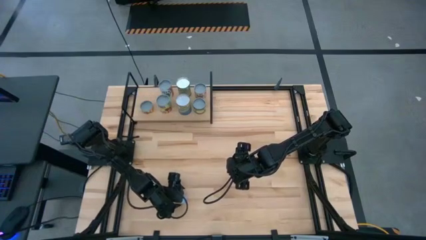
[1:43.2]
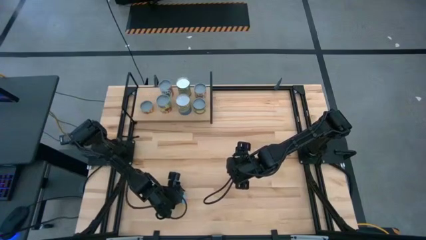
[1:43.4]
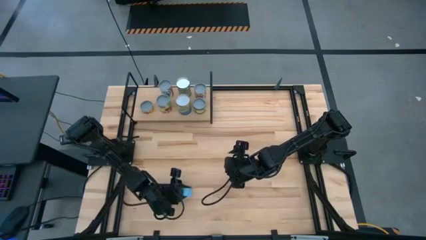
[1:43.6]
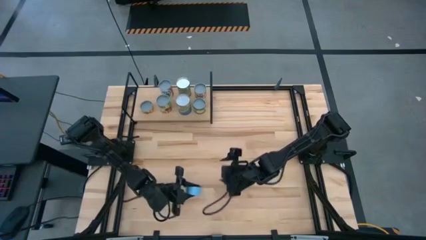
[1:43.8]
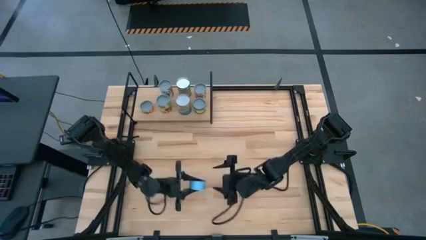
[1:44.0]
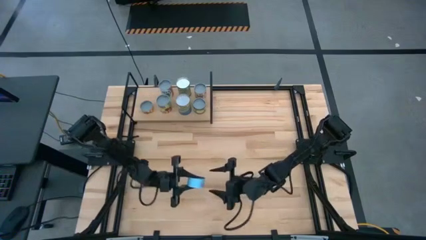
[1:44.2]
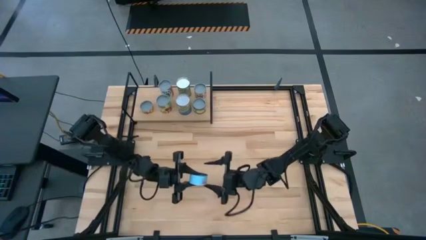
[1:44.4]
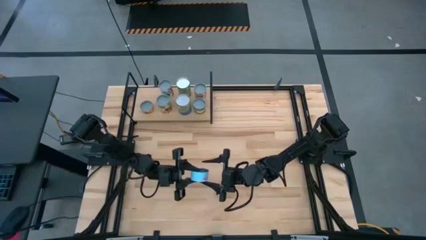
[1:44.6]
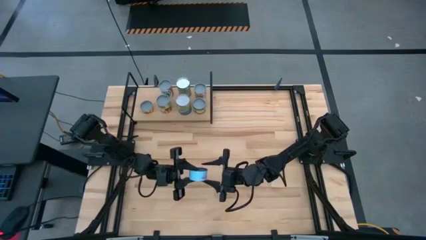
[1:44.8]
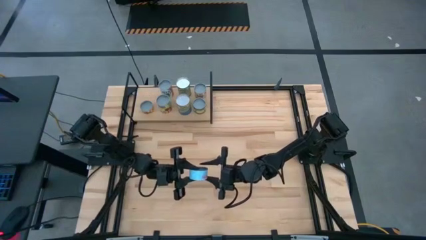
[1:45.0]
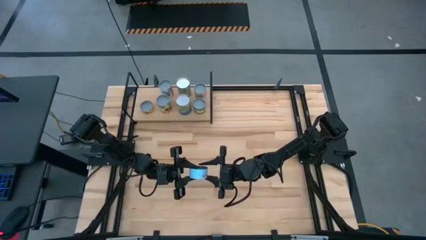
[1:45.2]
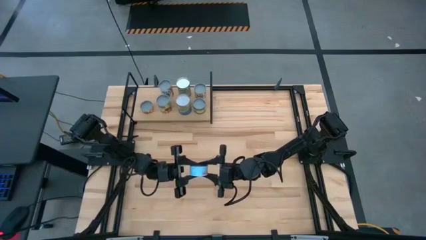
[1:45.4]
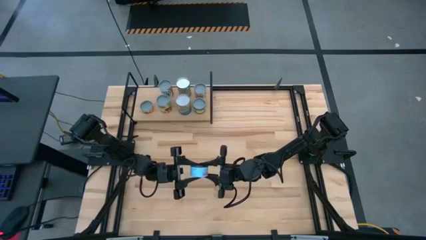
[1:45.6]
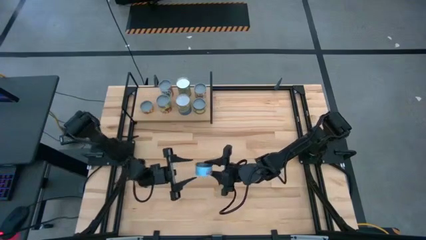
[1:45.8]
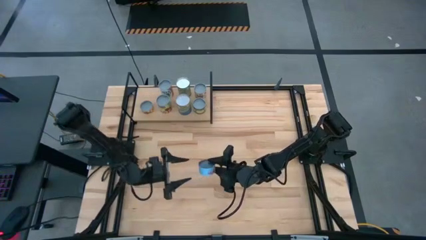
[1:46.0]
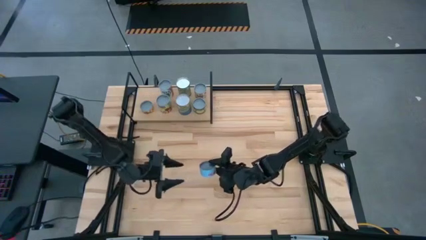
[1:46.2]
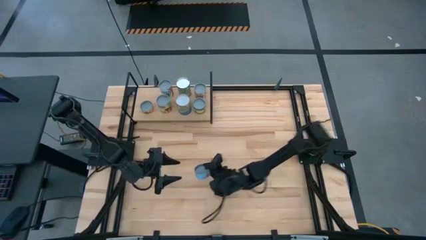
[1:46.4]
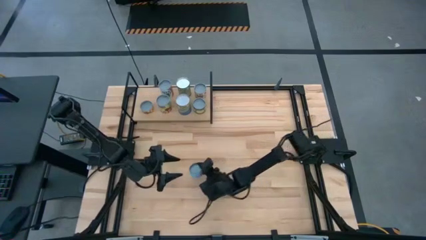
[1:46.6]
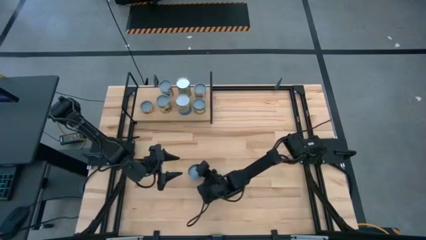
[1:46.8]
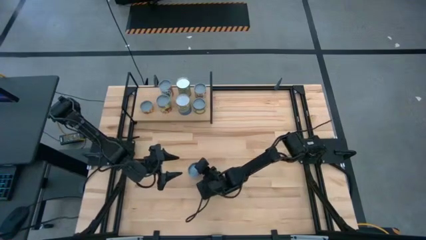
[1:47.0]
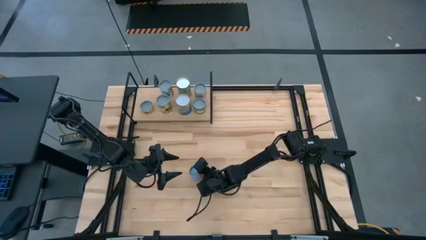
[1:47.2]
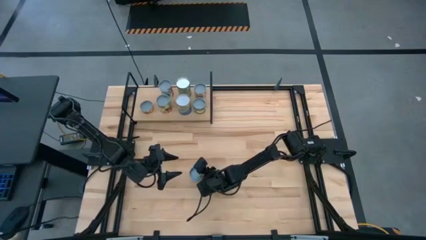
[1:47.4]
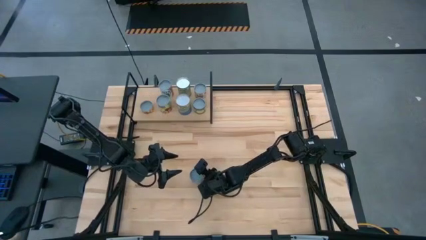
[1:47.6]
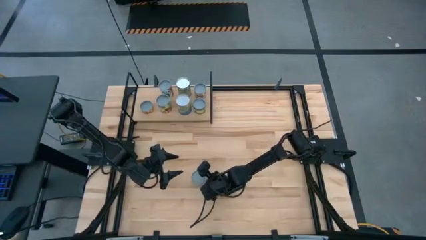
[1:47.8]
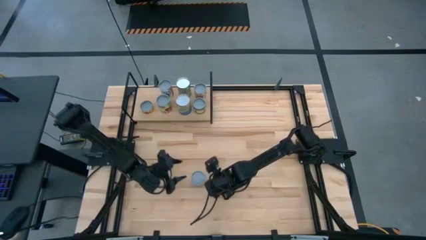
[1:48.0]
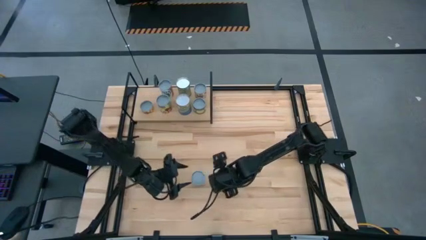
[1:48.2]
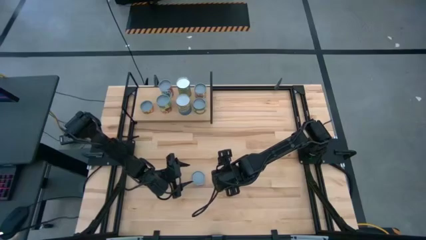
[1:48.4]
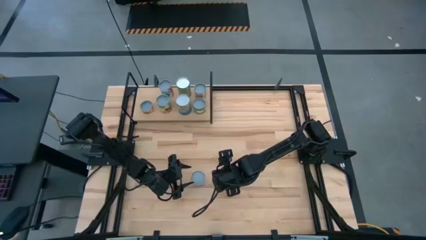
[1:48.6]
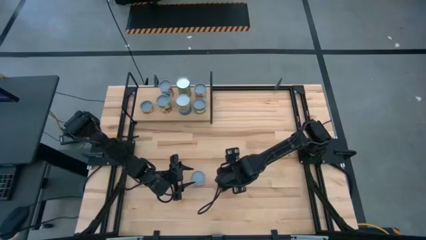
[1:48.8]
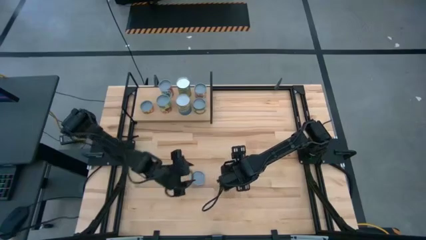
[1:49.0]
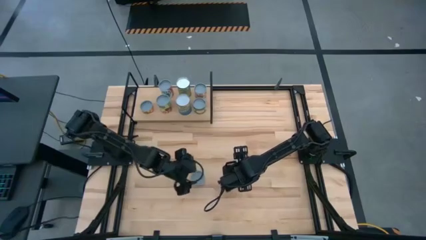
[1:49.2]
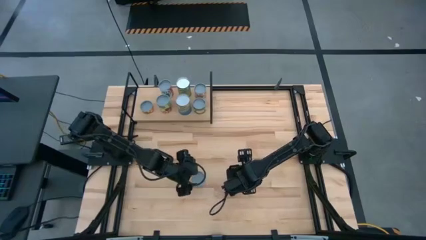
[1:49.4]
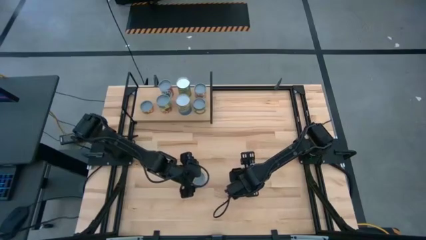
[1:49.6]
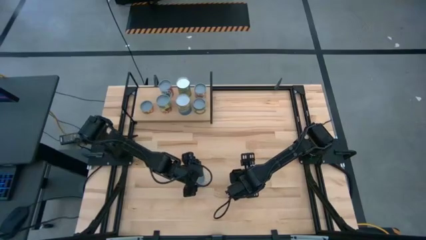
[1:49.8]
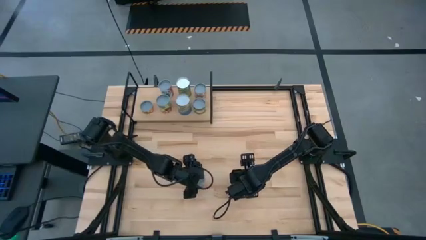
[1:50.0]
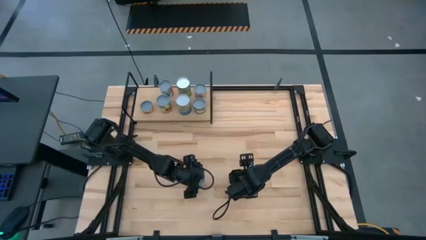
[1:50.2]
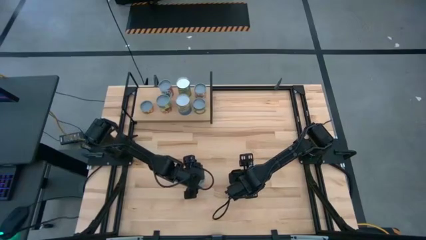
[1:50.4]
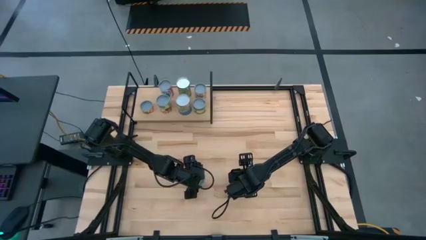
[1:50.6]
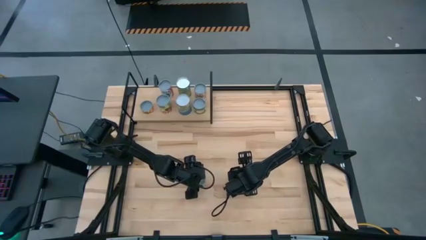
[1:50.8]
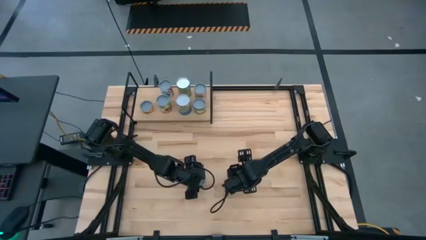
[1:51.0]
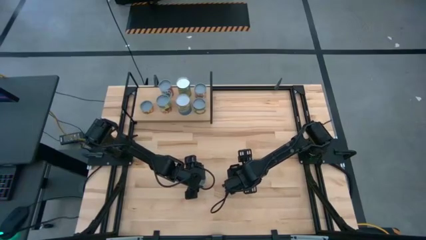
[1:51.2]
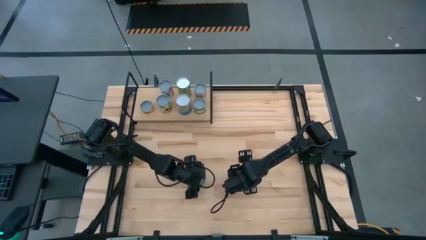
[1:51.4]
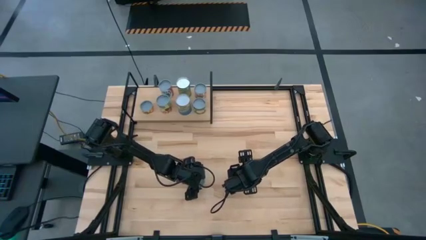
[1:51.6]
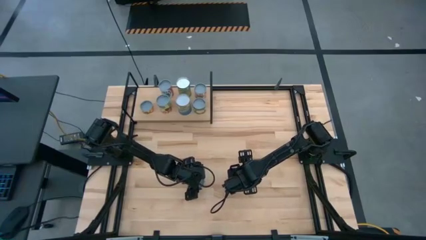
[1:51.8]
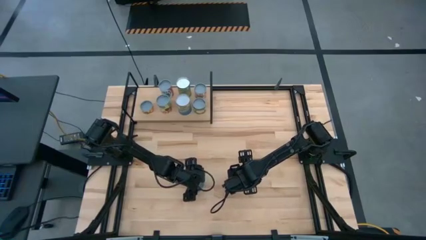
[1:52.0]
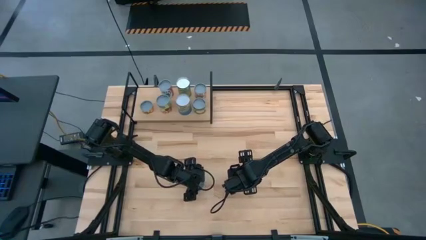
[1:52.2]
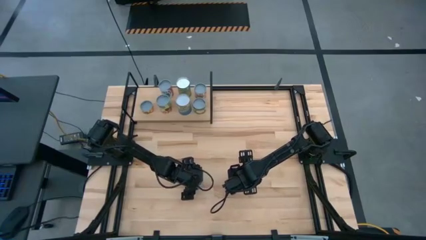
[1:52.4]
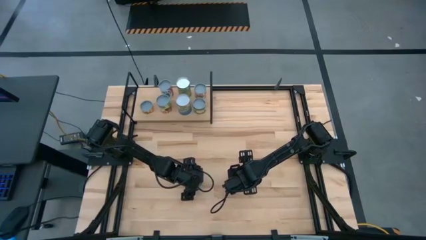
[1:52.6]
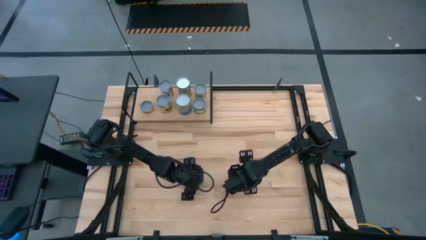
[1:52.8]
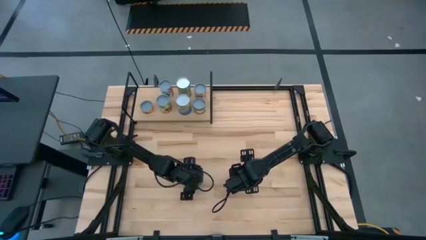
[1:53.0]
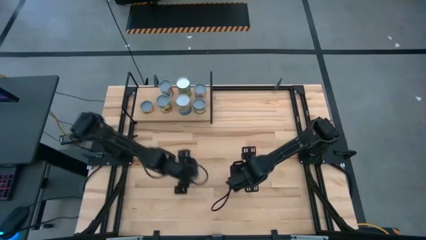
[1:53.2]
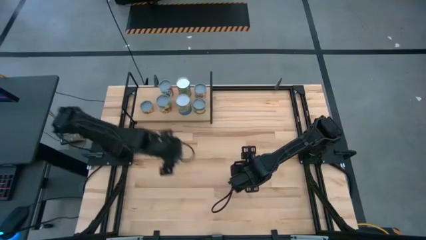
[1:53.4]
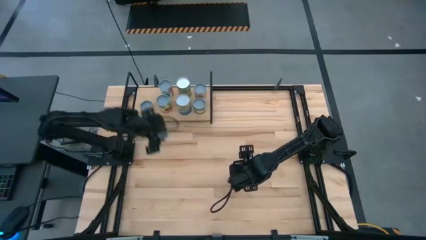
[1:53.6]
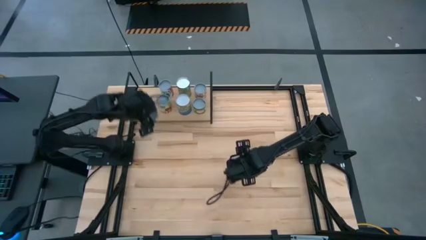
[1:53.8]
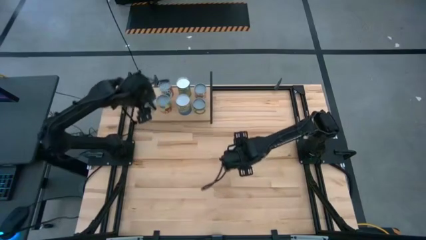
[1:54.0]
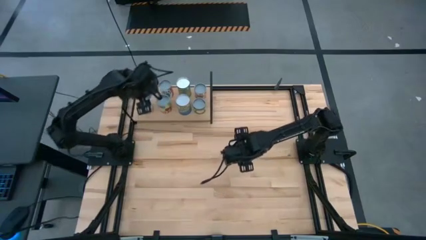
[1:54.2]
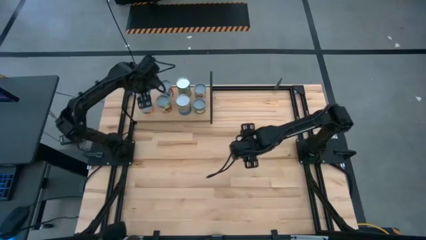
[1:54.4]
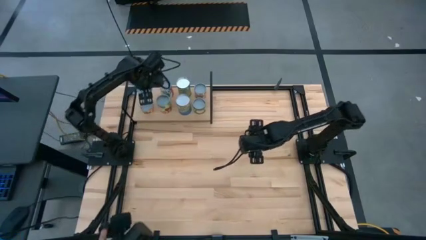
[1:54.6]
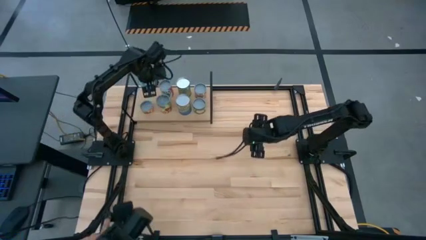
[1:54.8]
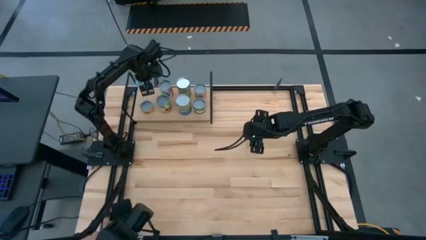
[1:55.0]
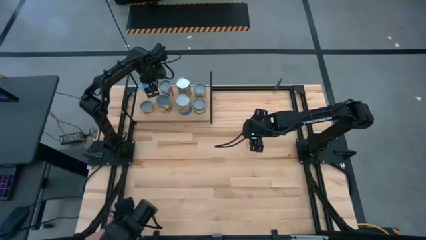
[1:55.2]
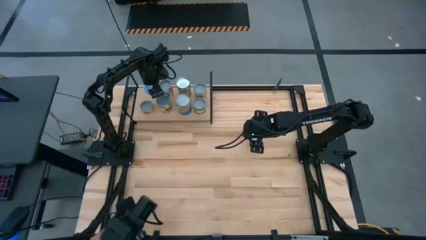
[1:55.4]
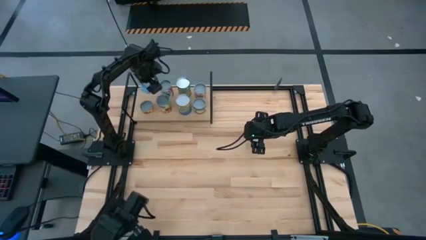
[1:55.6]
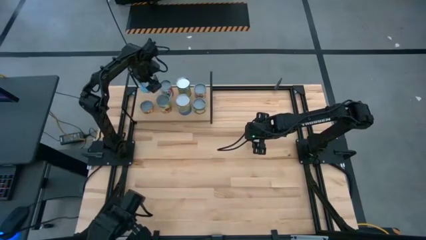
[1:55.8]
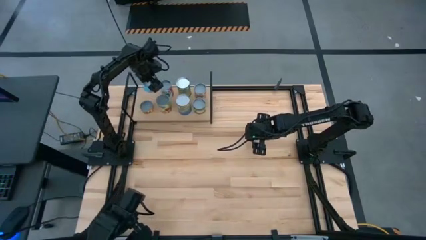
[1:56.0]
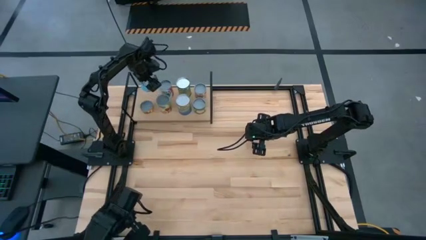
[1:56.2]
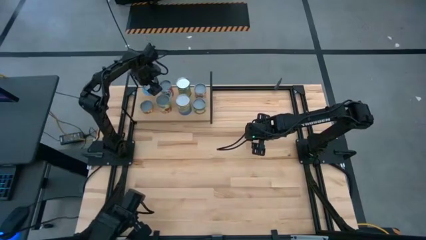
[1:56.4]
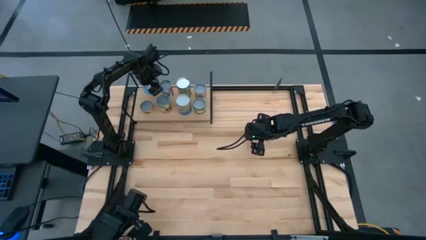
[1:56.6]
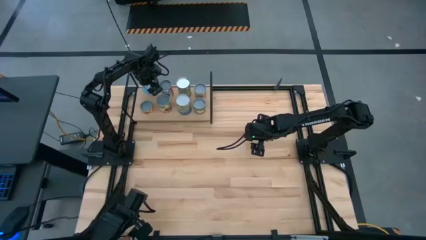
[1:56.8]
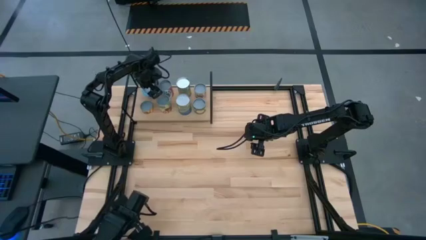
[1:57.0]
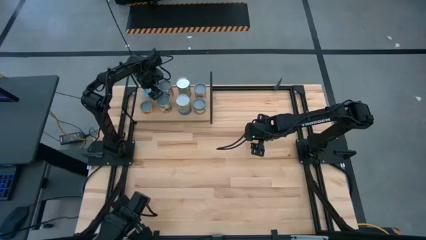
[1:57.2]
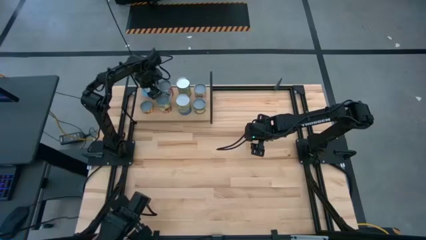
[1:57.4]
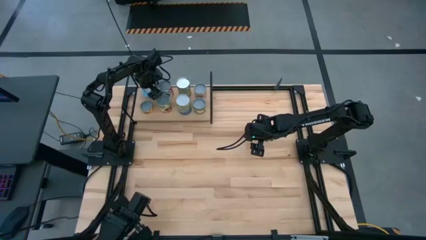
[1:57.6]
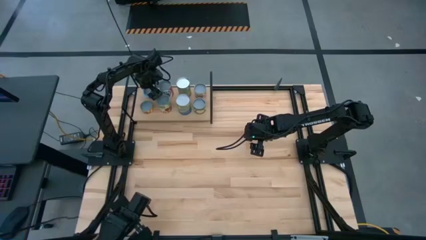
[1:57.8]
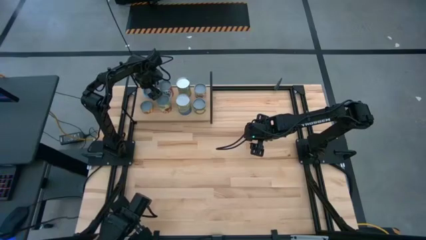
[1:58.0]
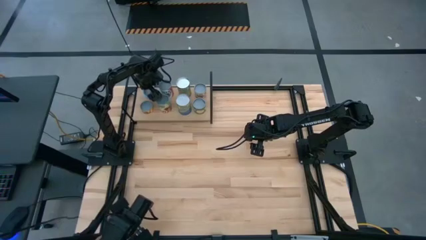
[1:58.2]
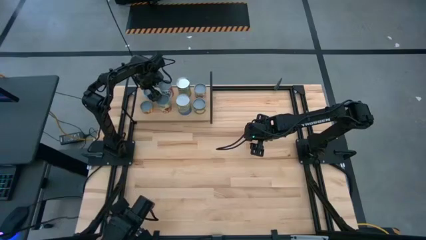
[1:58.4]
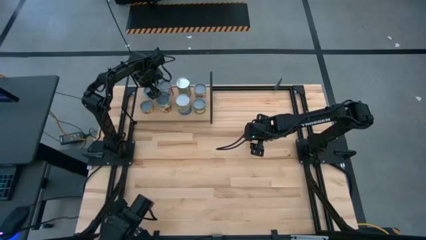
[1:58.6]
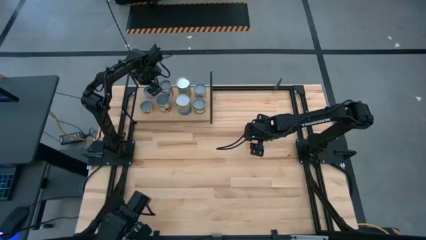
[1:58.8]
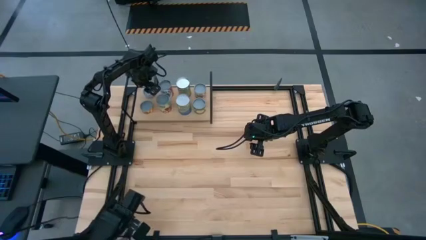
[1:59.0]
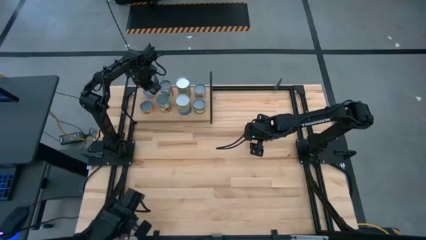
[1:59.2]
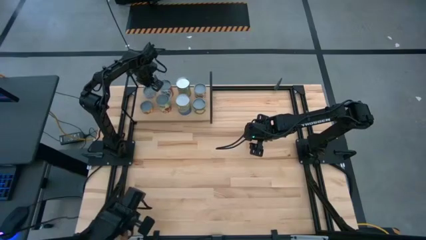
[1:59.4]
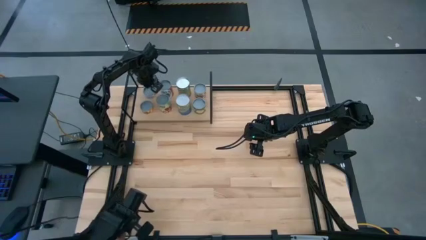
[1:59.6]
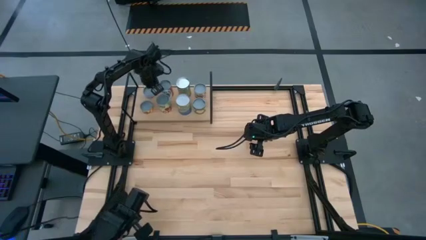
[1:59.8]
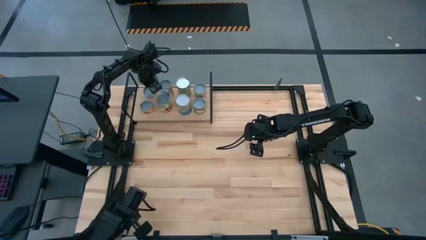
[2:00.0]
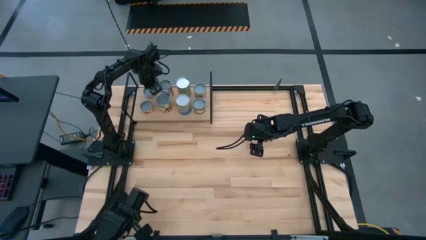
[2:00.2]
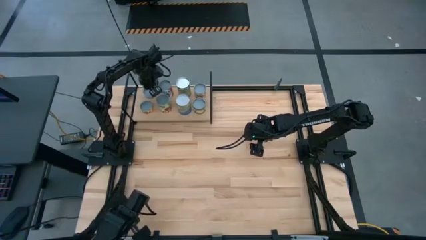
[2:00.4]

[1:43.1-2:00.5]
Task: Pick and place cans onto a shelf
Put the canned salmon on the shelf
